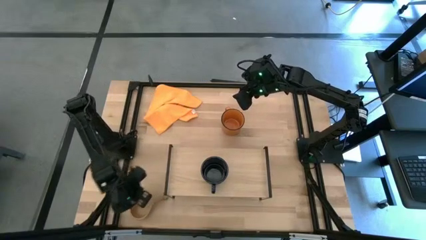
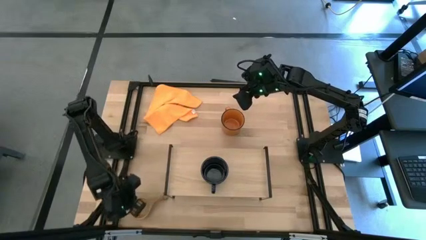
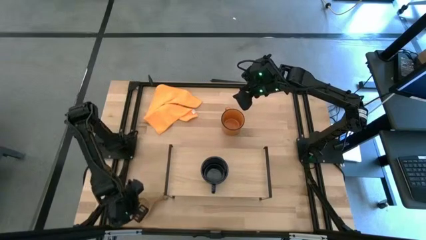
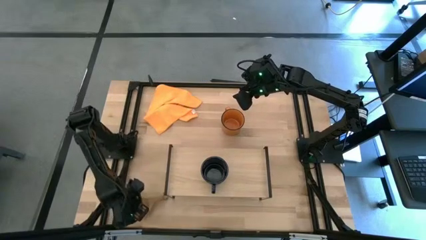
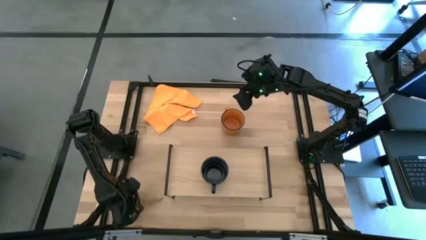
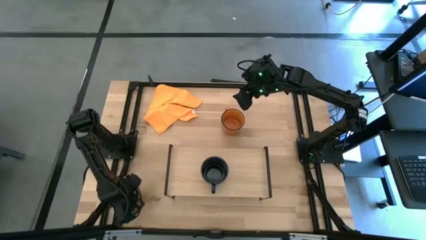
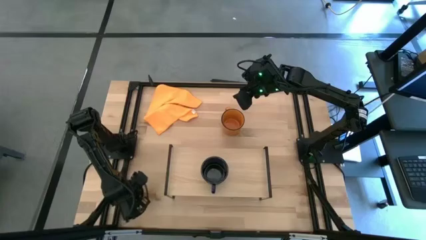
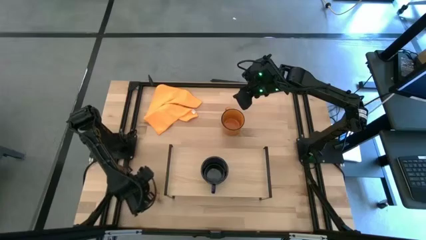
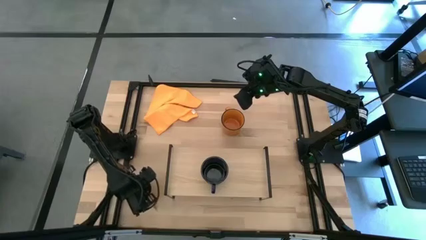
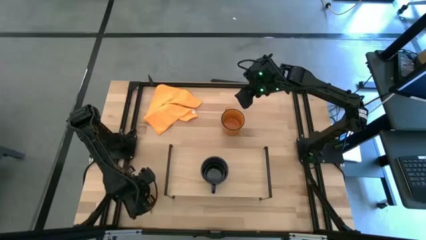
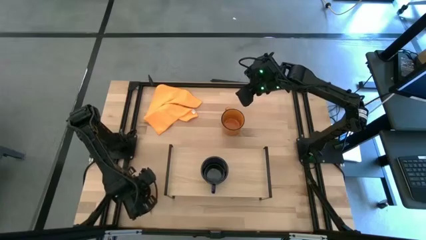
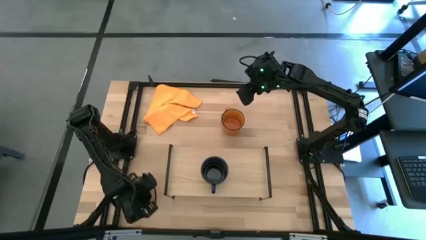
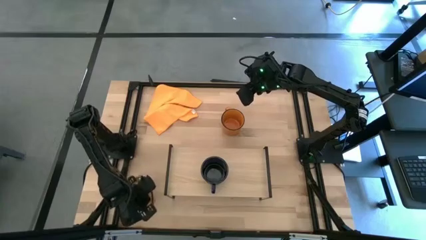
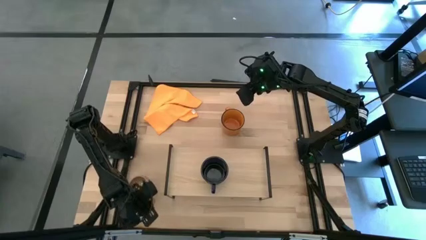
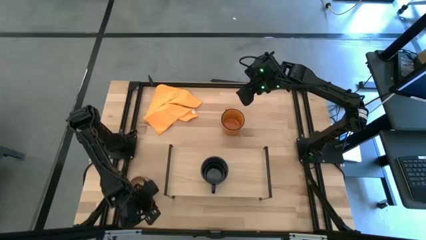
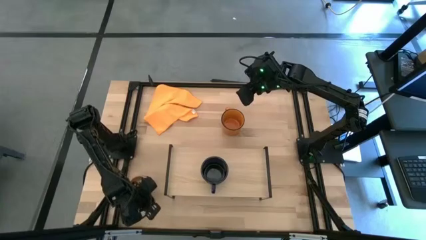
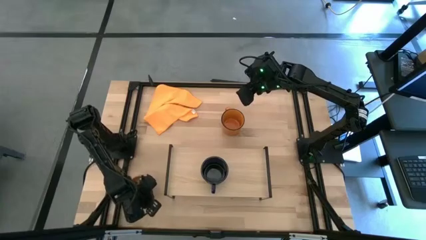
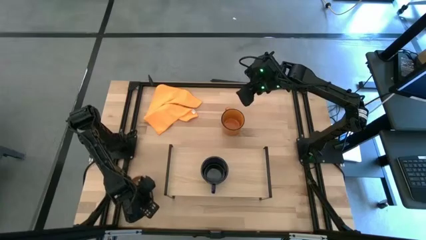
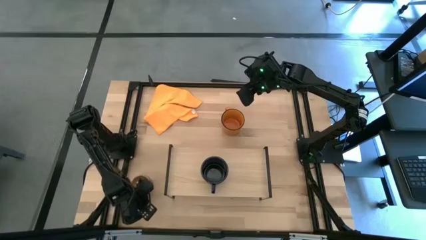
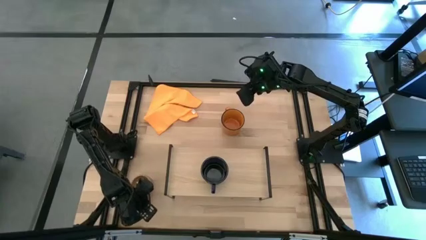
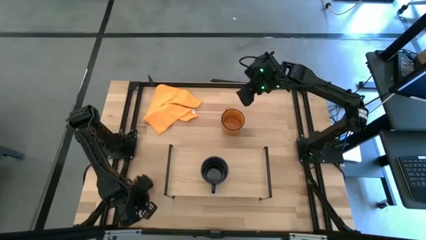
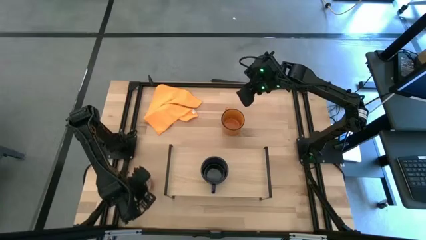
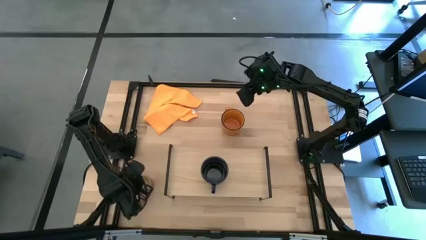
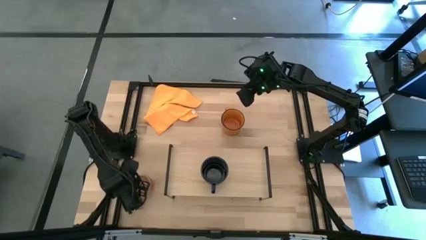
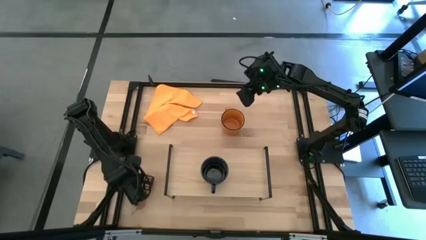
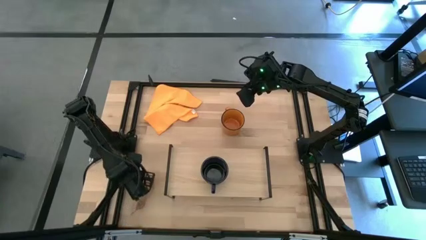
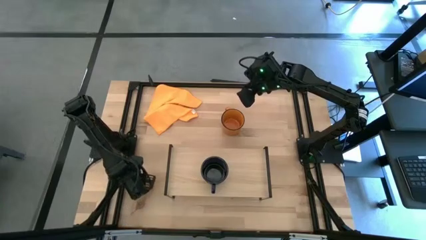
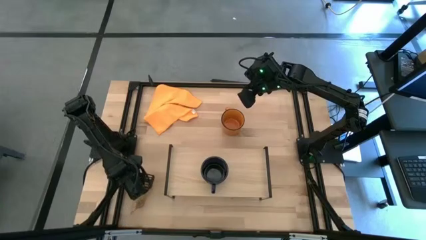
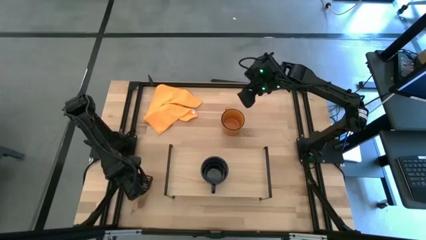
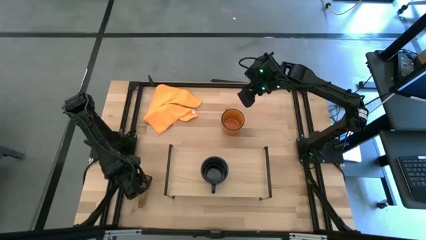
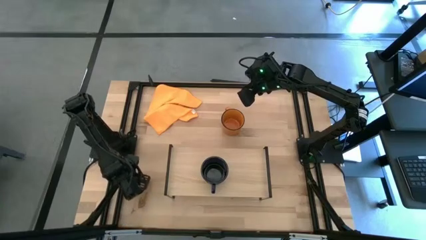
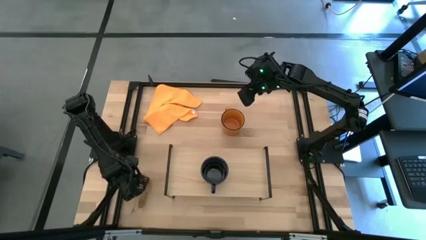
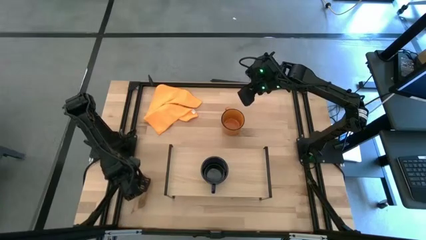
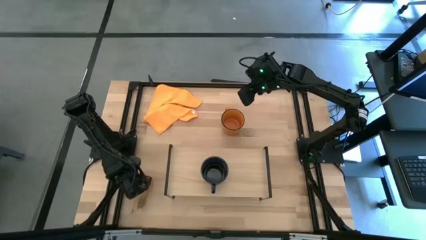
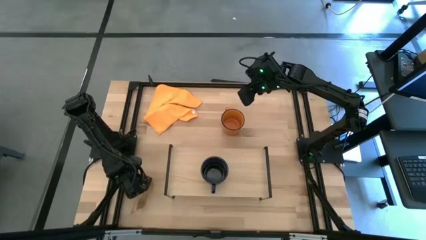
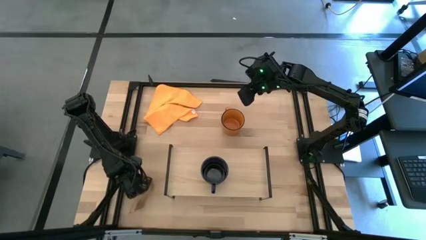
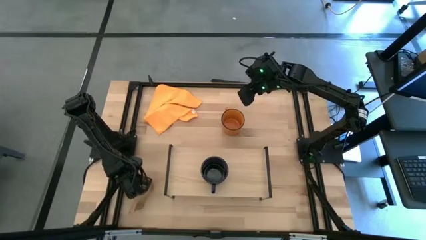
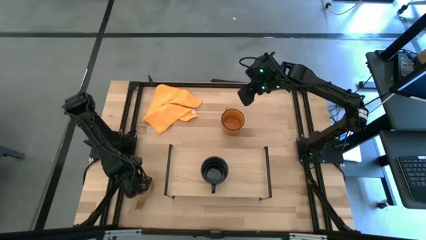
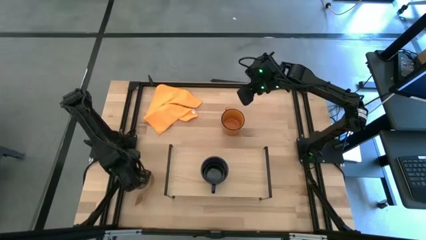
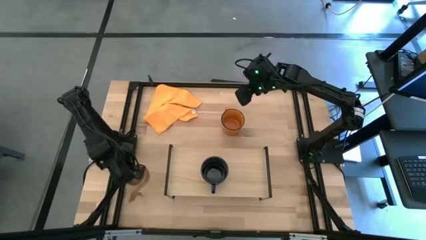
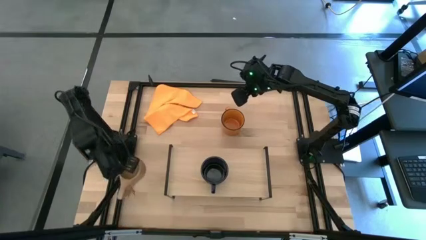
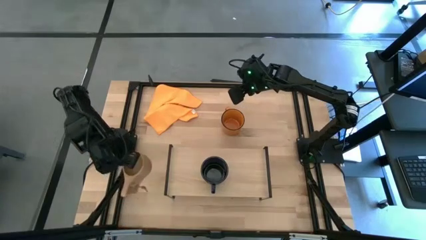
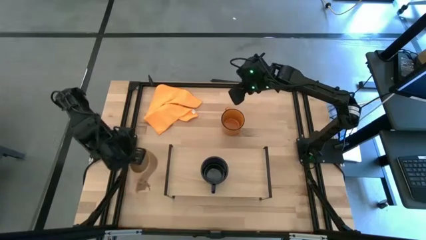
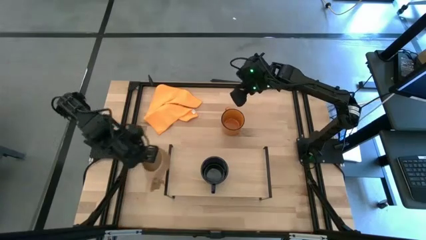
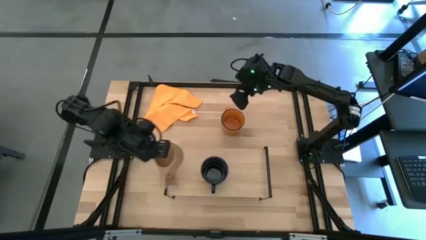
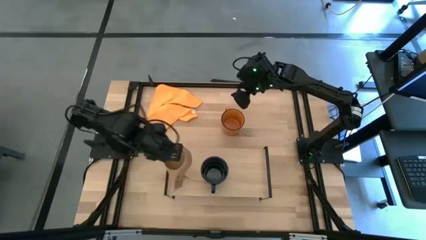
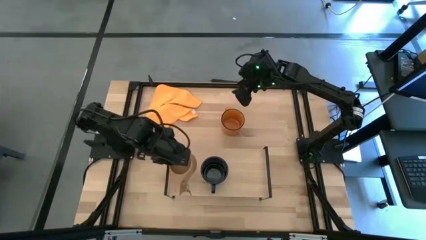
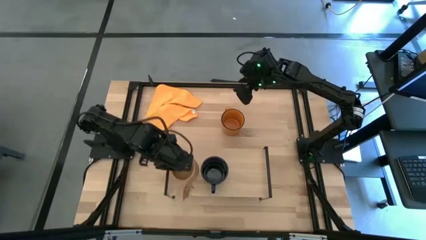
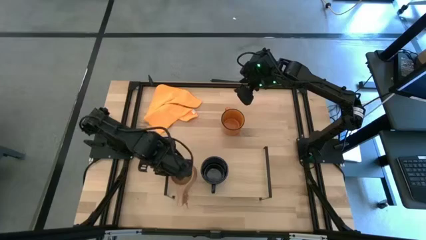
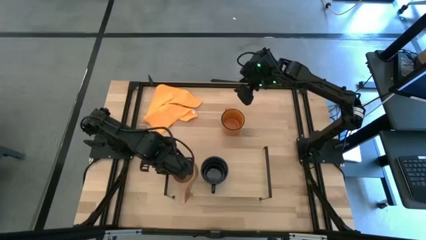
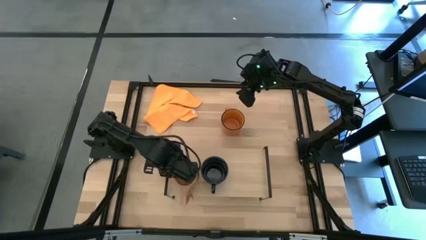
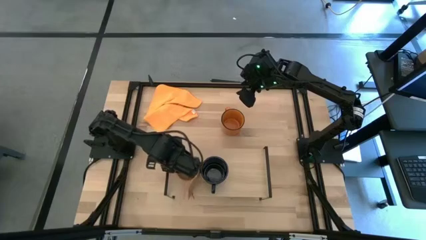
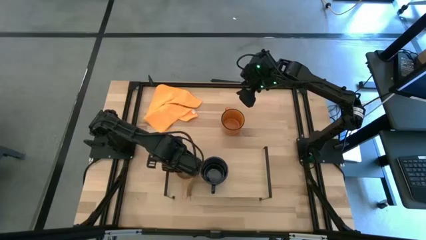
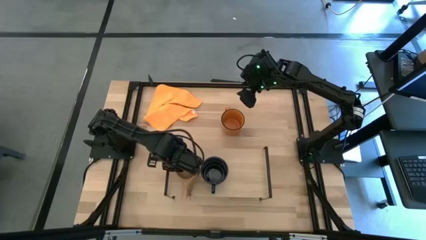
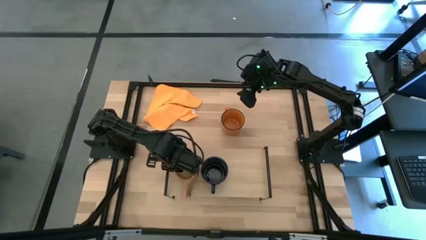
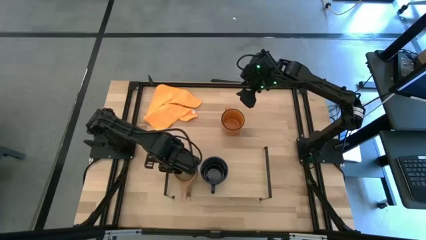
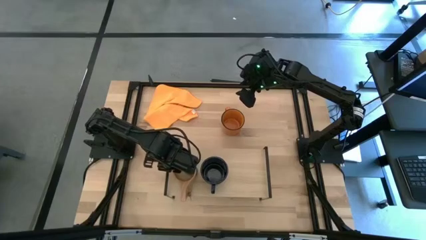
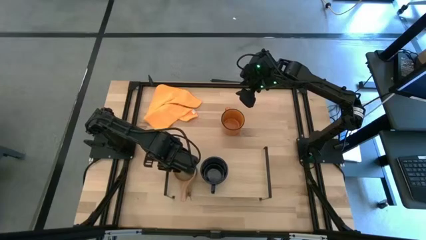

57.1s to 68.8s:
Task: Stack small to large cups/mugs on shelf
Put the brown mug on the shelf

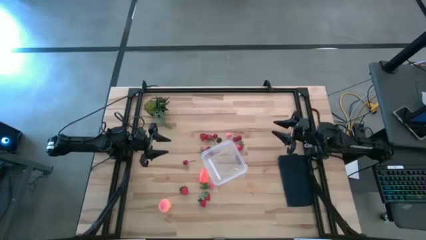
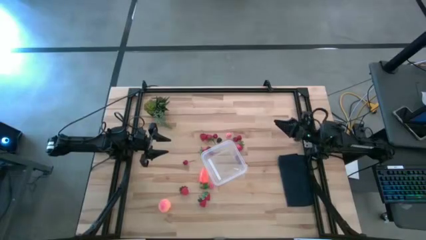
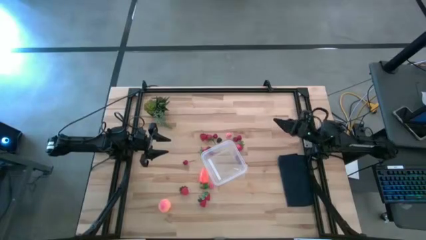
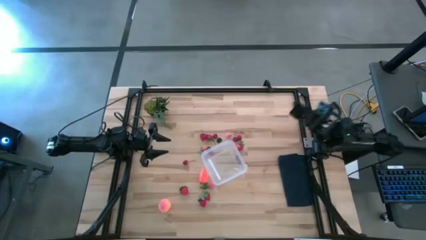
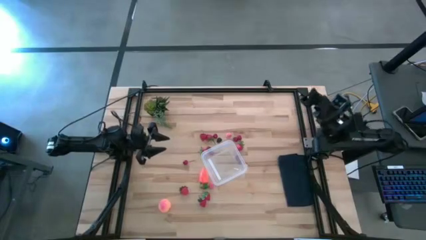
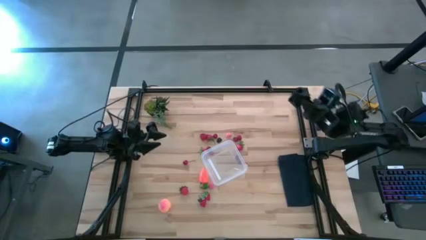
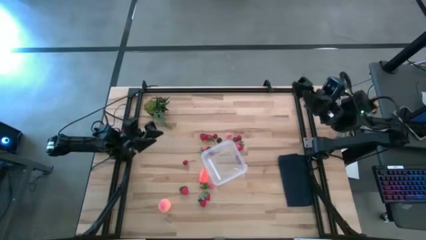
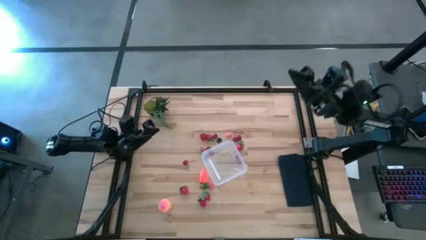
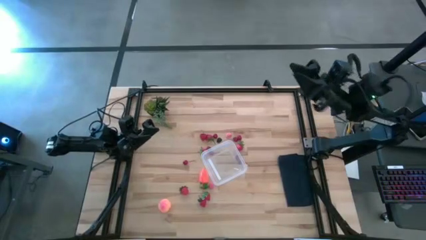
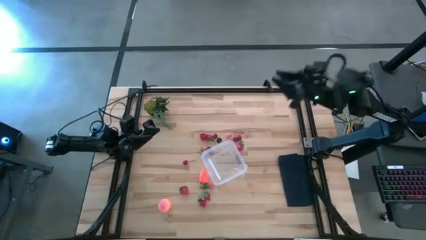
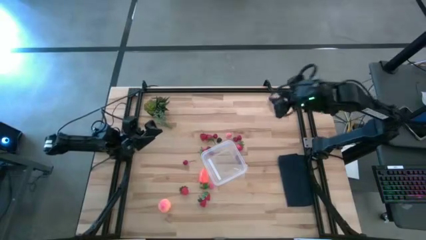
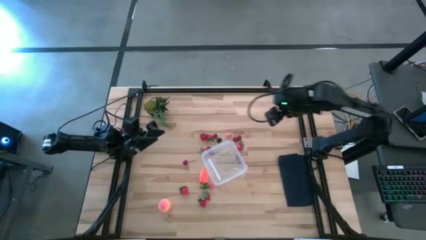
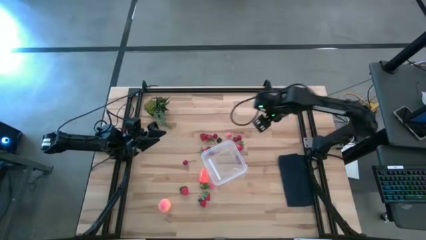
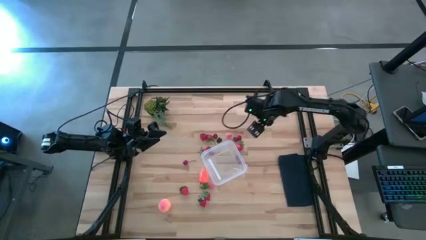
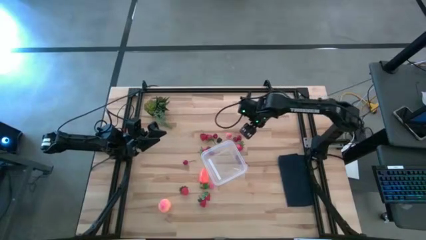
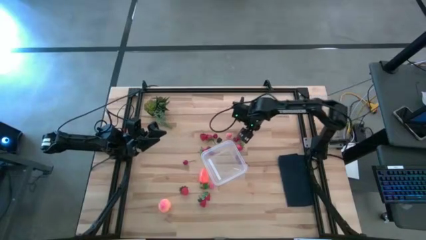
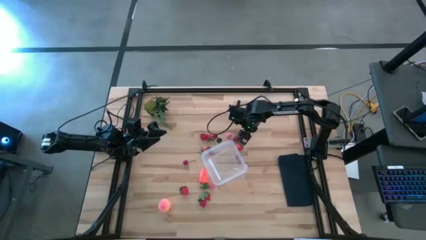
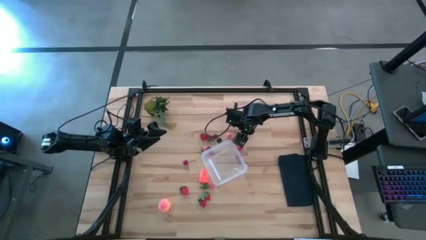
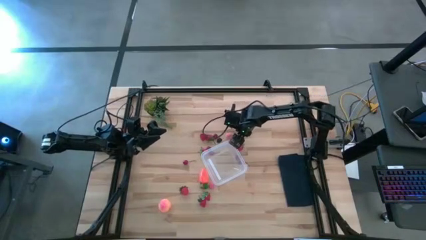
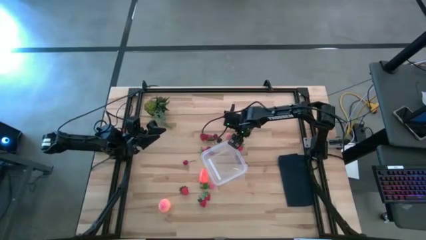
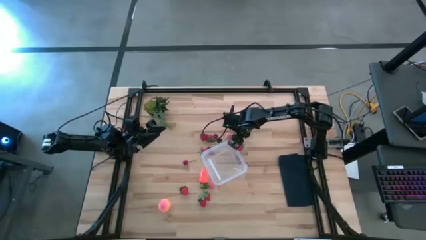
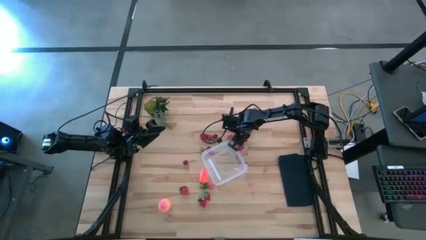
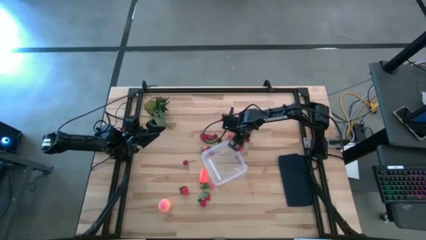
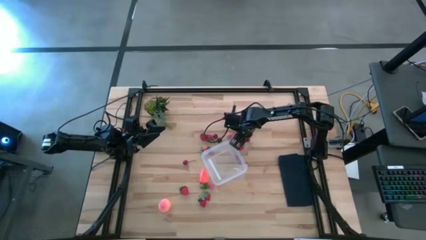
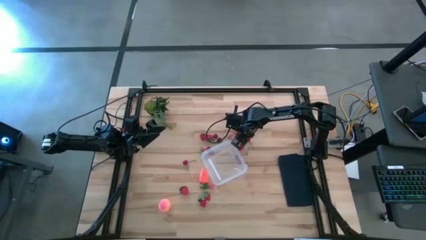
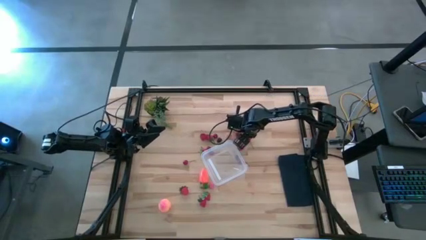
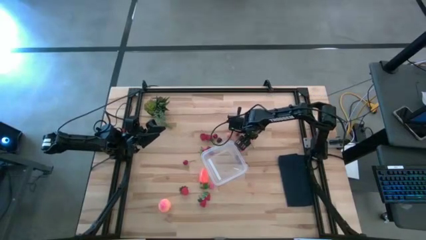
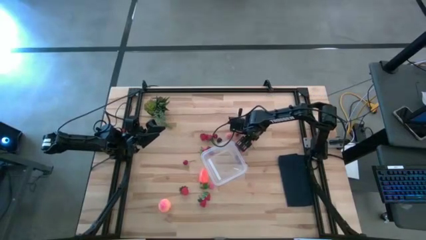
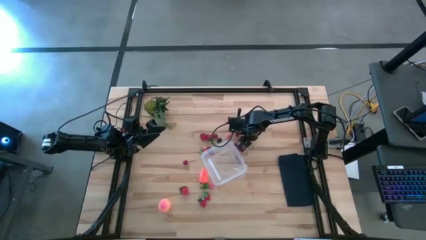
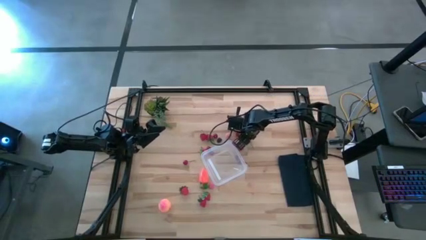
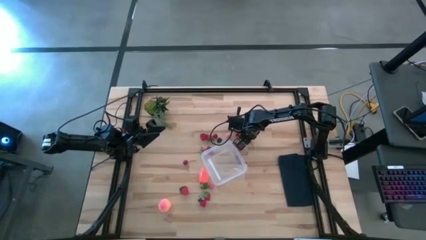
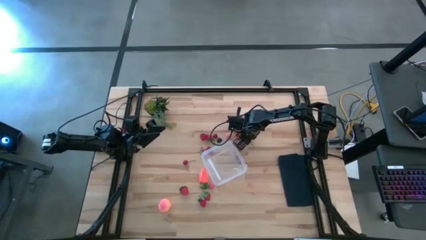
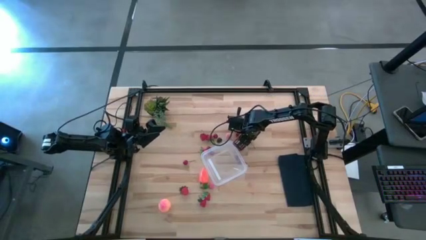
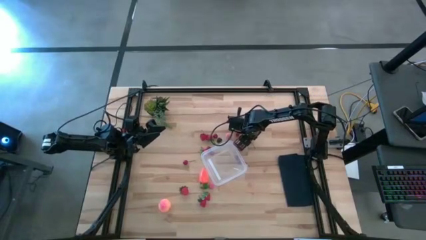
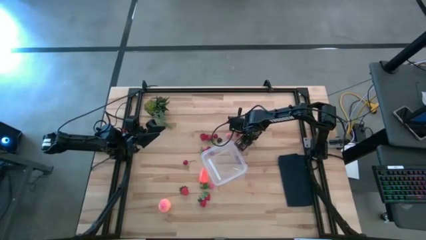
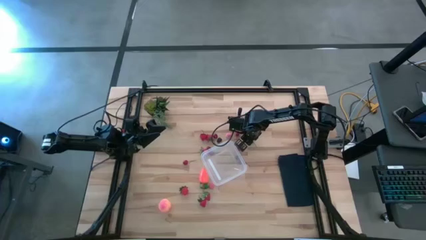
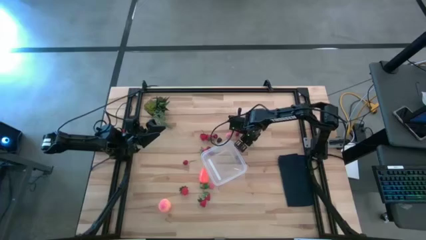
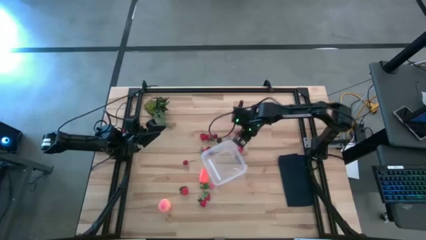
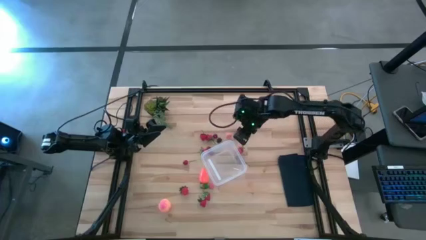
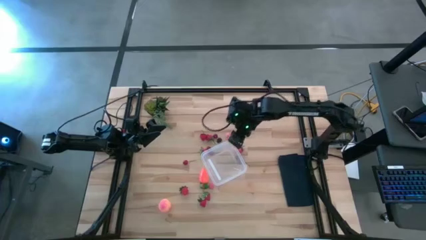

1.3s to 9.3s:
Task: Pick and placing Produce into tupperware
Put the cherry into the transparent container
